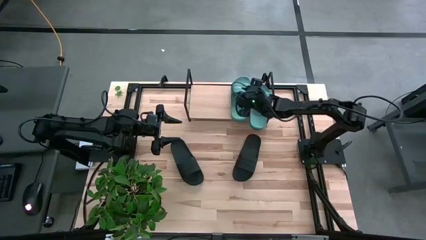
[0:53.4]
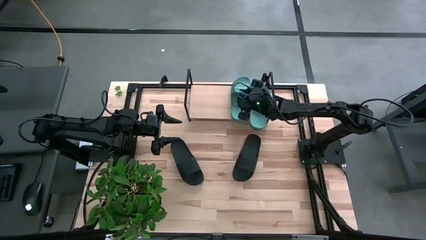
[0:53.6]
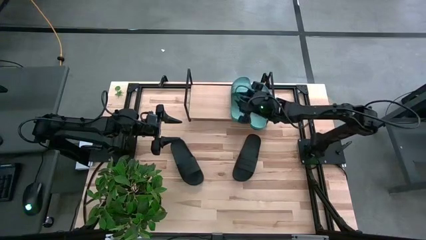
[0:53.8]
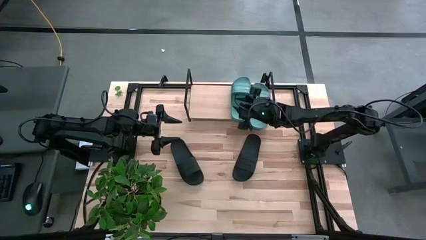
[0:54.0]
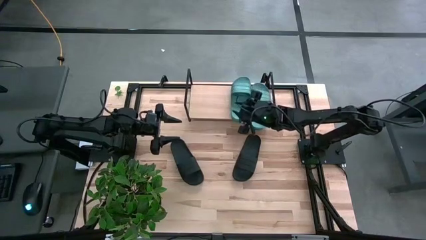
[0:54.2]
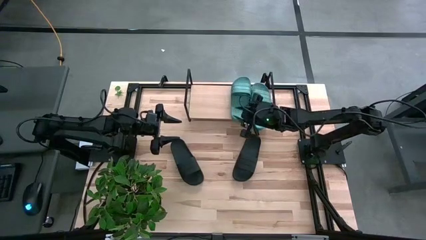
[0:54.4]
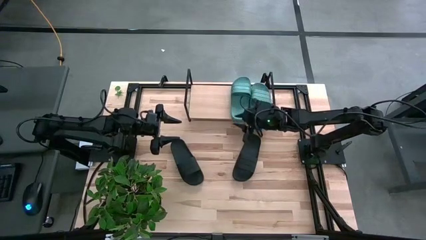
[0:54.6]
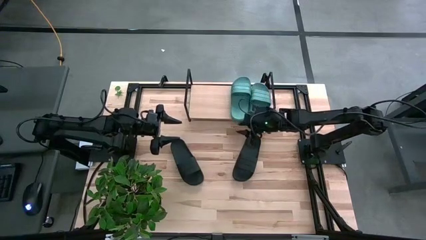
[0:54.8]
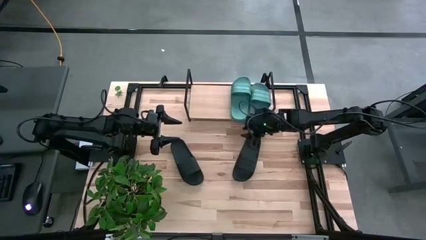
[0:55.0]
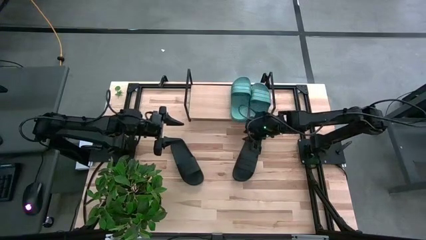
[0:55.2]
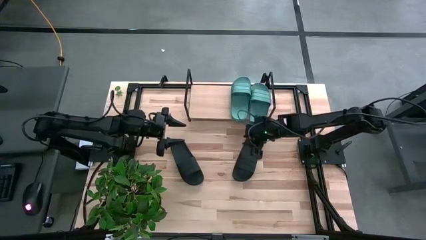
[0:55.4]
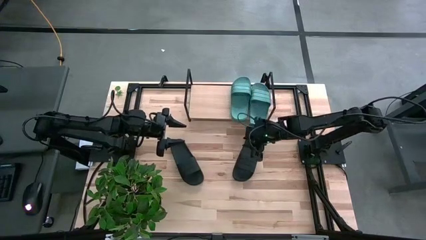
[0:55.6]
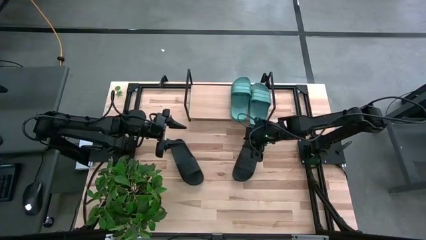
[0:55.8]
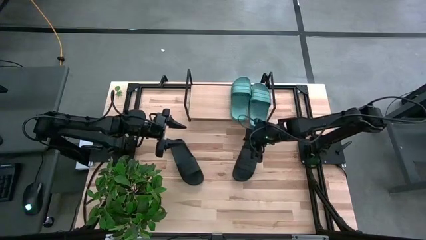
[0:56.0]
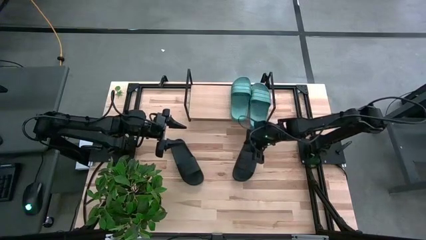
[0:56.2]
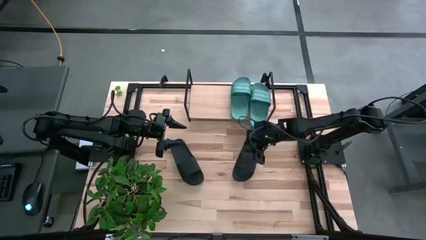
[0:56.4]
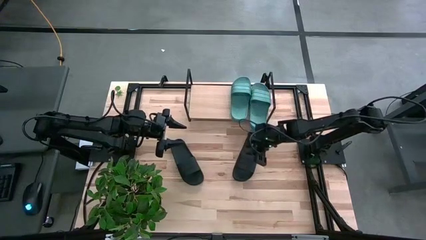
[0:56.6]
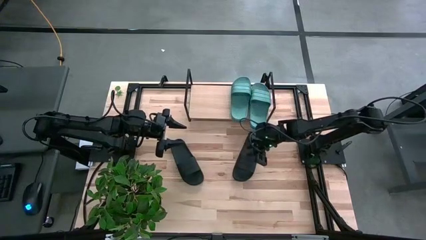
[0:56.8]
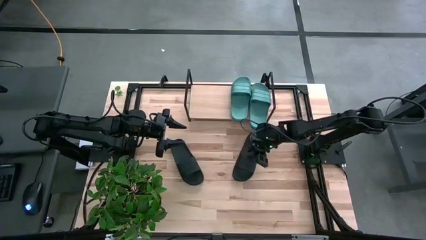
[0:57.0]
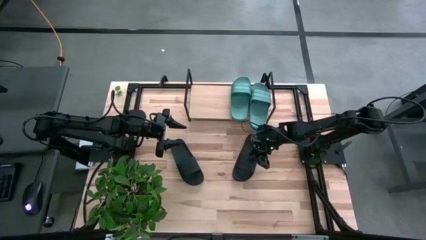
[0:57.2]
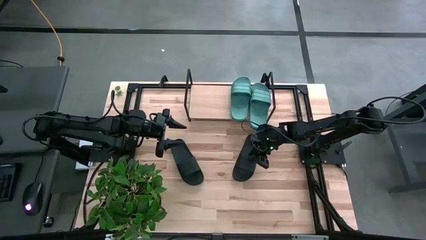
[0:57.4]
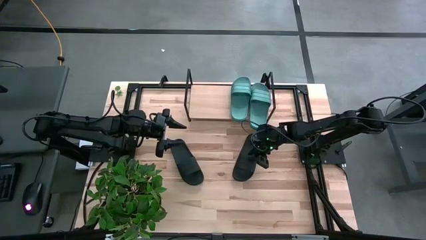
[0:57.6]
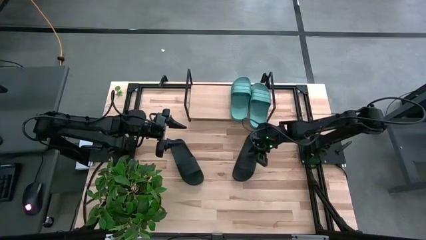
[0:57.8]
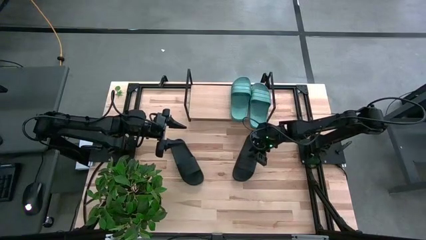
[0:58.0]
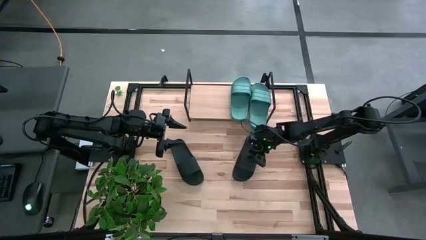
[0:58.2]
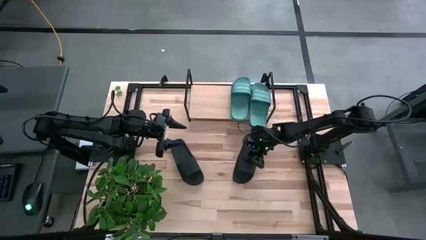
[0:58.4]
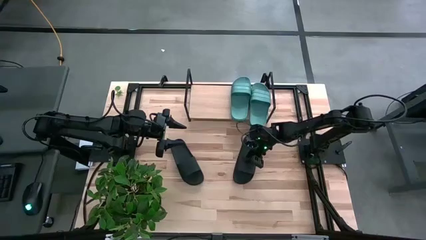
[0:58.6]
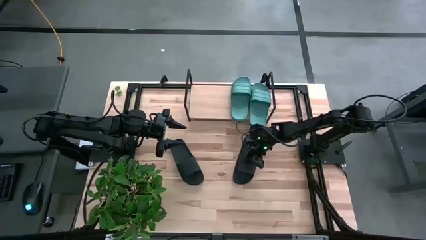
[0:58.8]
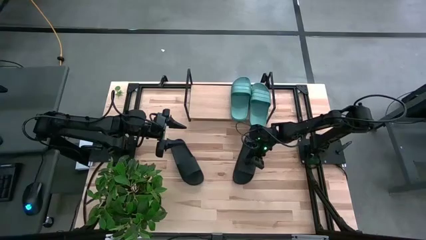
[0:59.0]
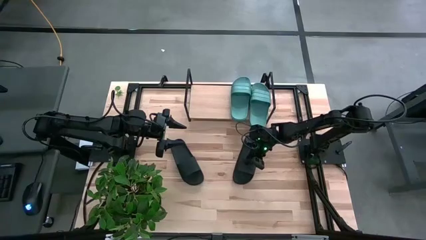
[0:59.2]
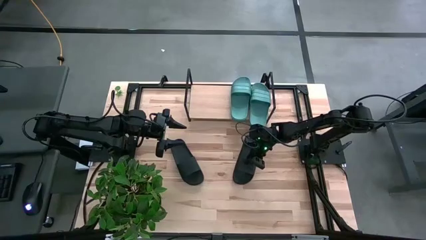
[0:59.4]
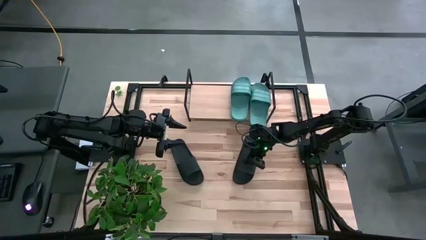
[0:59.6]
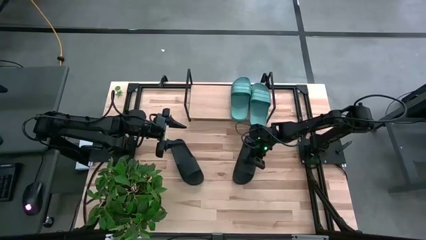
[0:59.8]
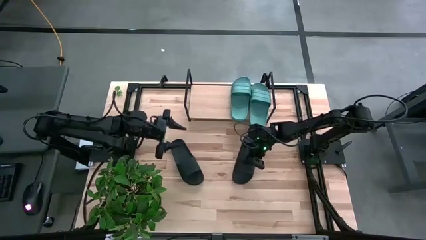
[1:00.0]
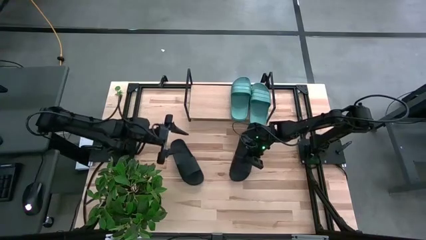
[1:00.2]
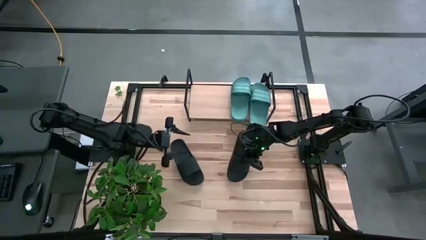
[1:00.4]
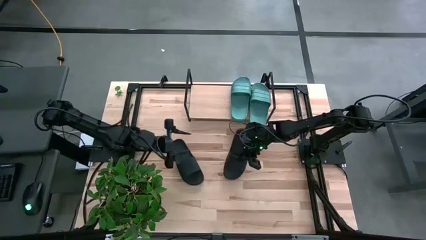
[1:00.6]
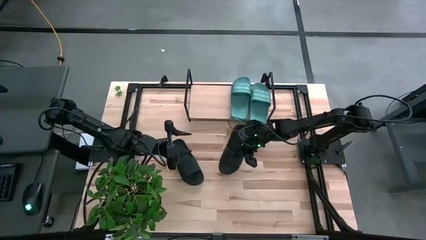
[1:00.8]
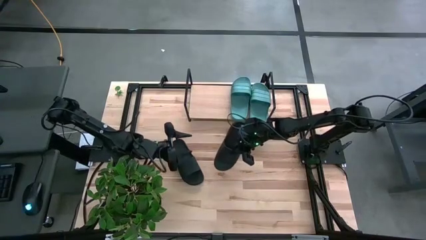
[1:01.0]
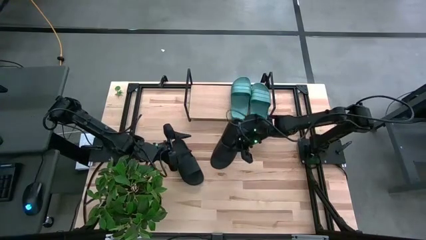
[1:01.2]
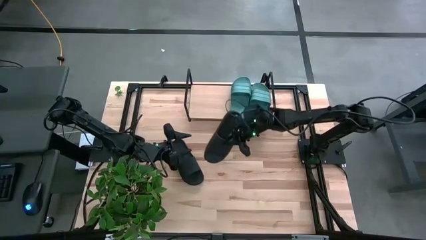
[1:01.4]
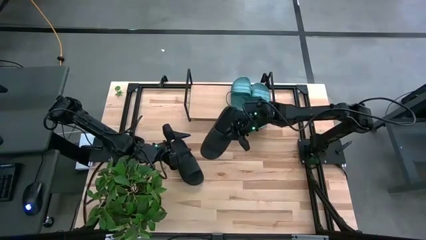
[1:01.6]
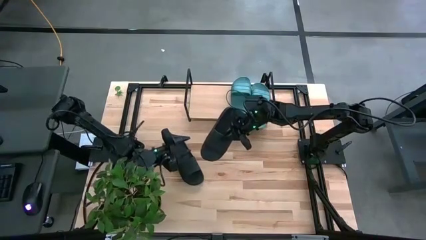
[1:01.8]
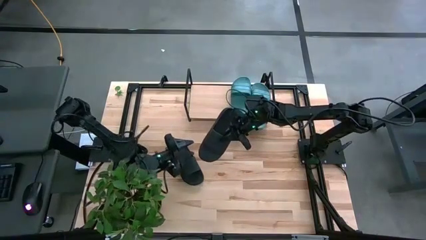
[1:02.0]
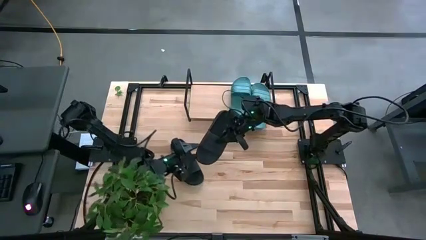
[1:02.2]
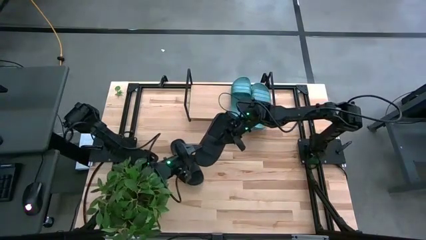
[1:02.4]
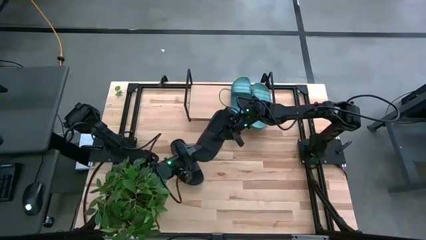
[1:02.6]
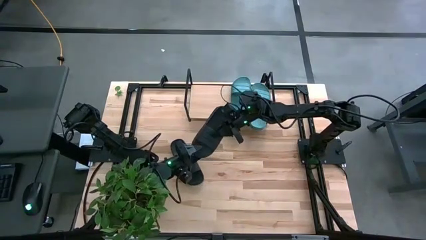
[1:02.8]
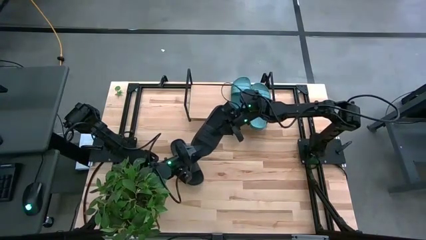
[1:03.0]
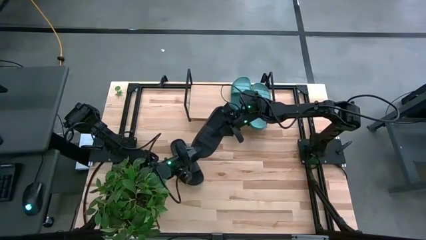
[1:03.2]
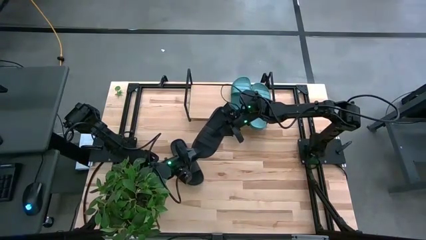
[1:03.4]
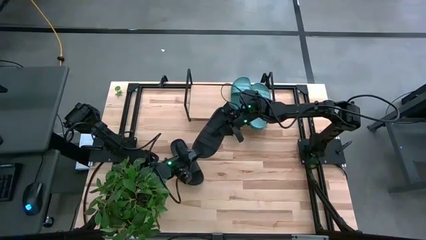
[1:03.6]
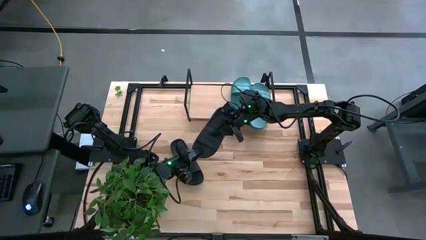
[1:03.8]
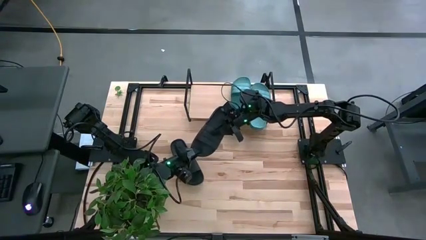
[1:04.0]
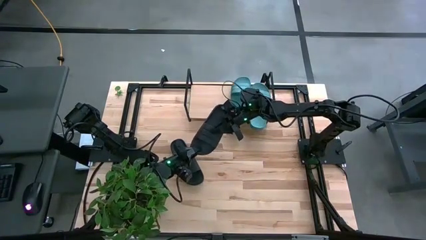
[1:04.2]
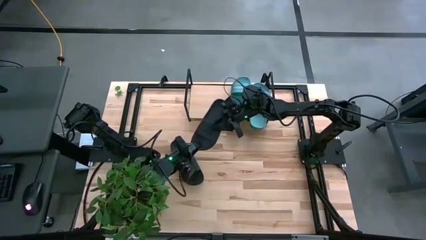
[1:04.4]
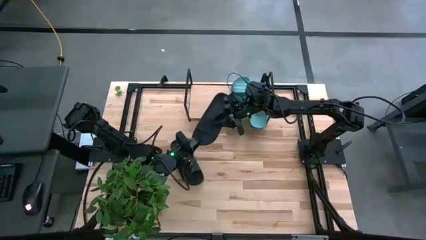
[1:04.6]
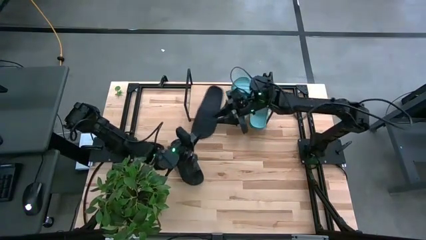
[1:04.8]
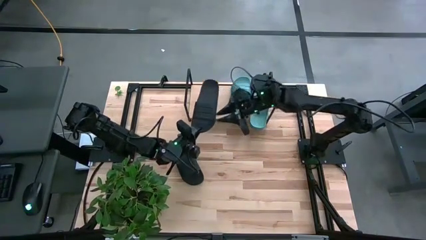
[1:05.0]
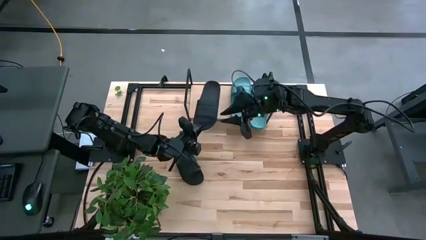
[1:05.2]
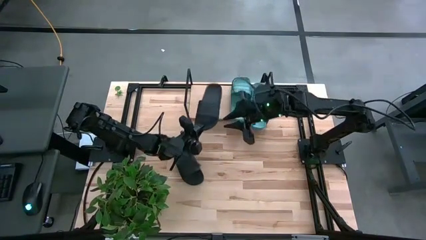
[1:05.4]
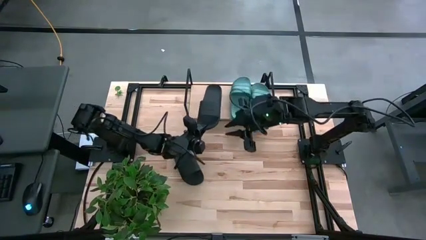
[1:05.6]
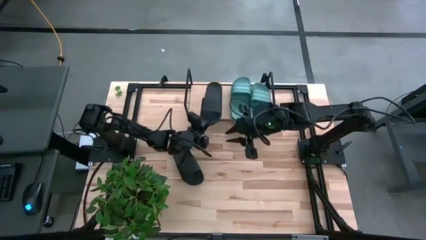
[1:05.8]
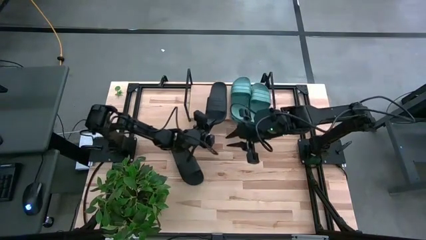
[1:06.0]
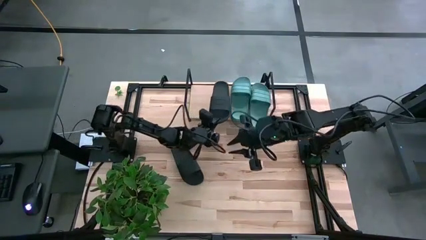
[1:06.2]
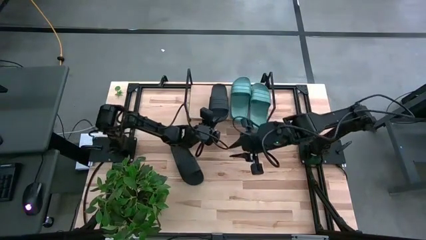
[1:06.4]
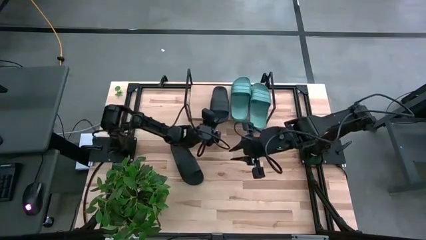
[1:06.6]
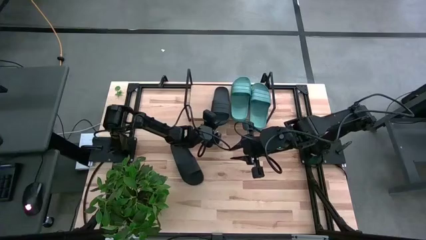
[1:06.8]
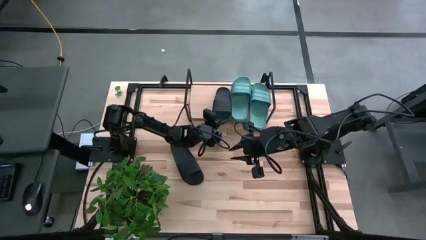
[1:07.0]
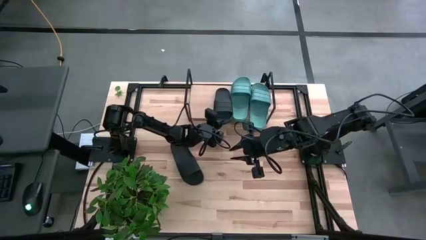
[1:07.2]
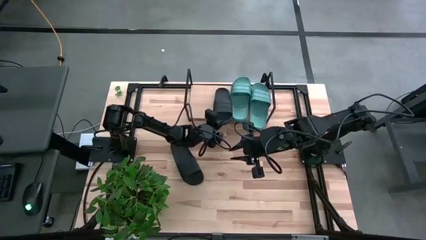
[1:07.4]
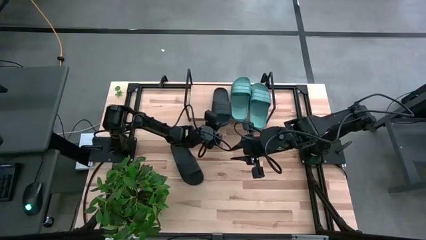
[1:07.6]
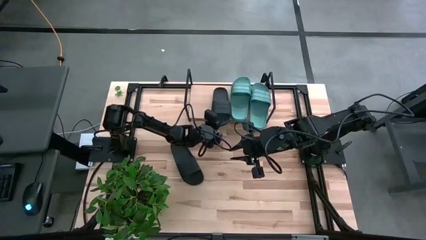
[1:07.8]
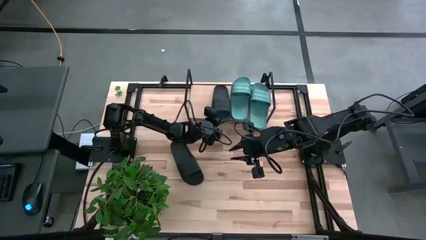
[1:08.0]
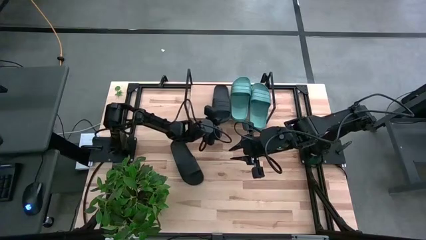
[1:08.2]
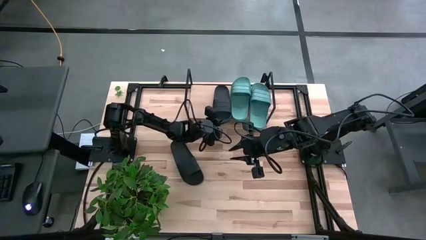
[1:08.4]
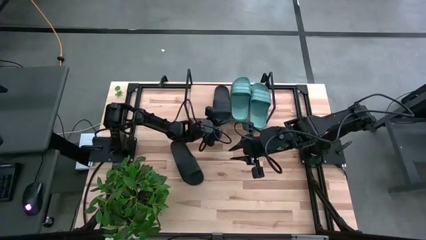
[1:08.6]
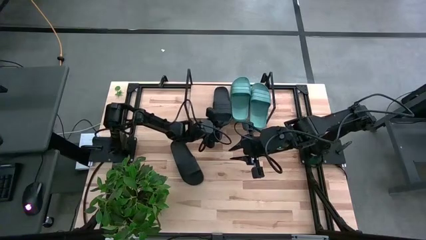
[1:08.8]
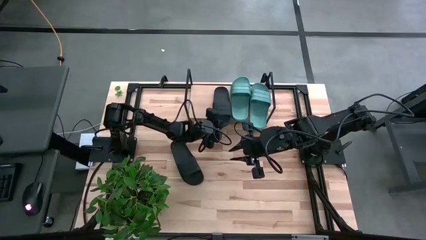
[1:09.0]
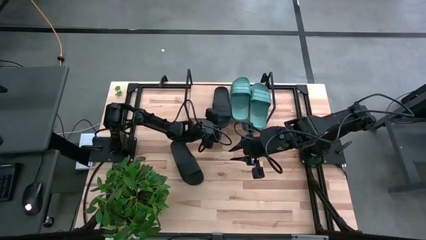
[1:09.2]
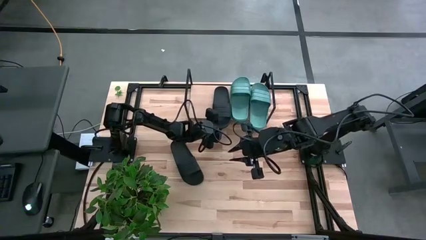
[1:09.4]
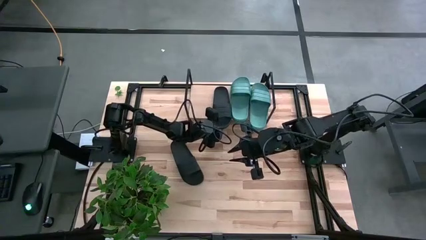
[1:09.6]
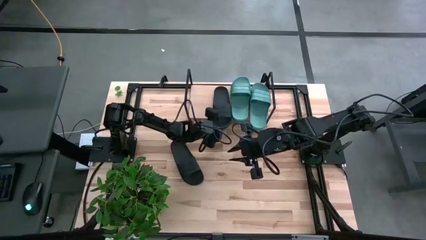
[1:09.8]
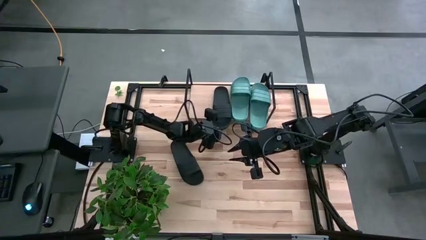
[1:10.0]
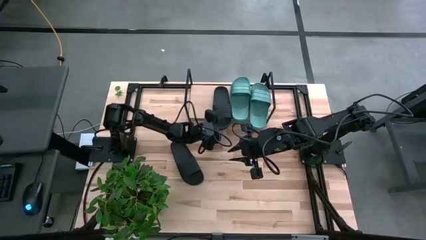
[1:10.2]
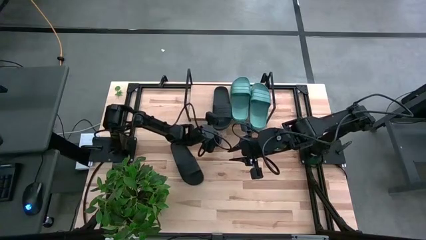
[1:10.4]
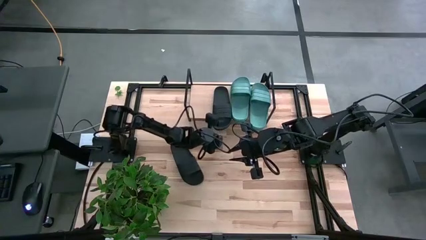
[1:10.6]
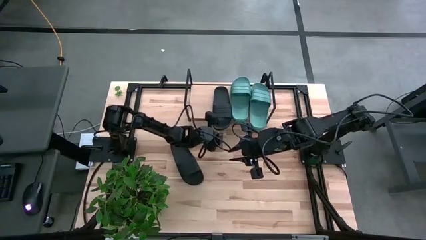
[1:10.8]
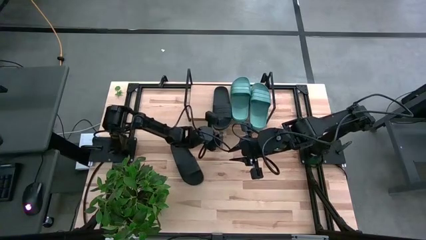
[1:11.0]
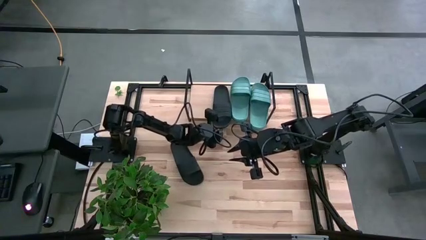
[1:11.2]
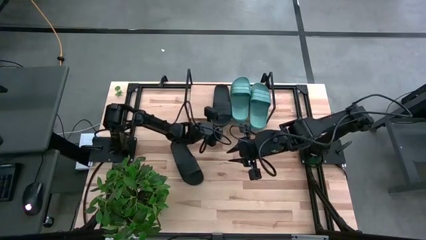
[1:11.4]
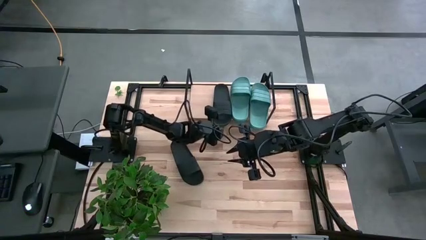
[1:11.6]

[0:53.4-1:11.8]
Task: Pick and place slides into the shelf
Put the right black slides on the shelf
